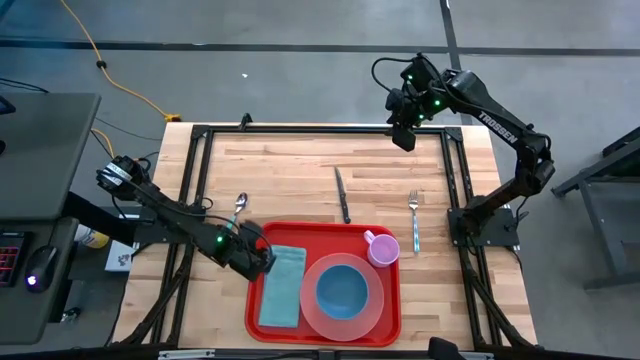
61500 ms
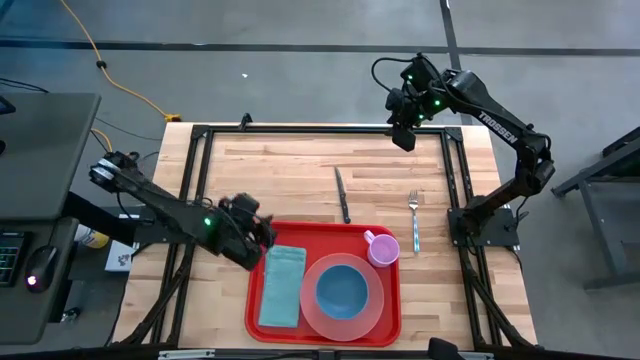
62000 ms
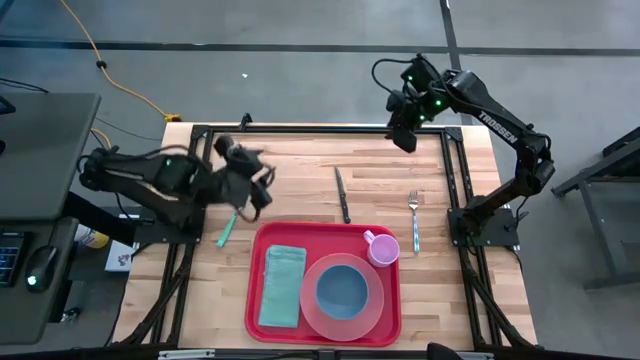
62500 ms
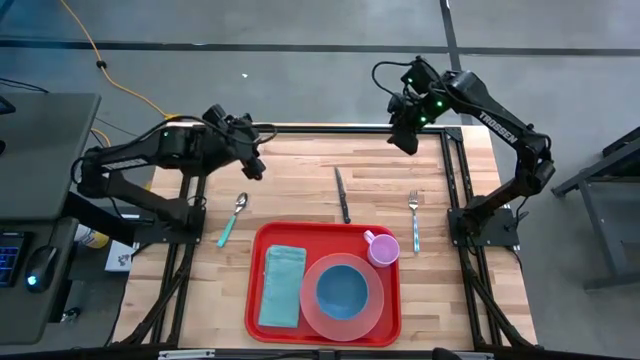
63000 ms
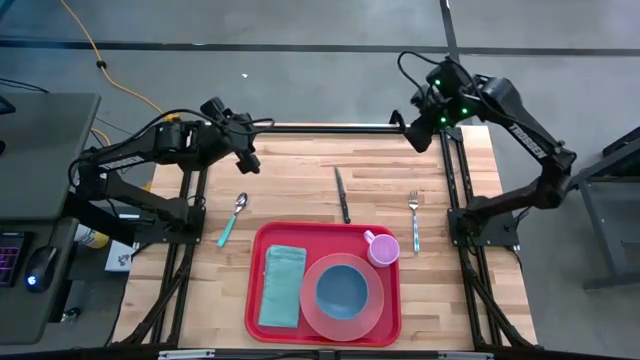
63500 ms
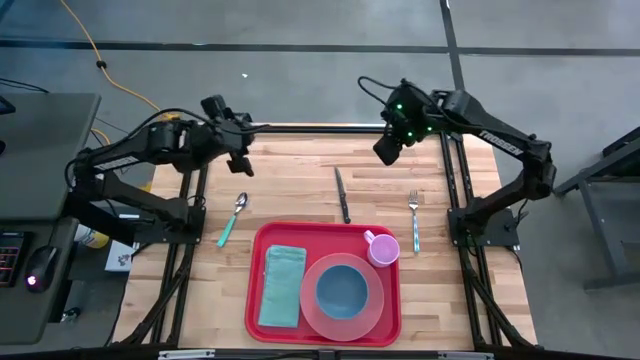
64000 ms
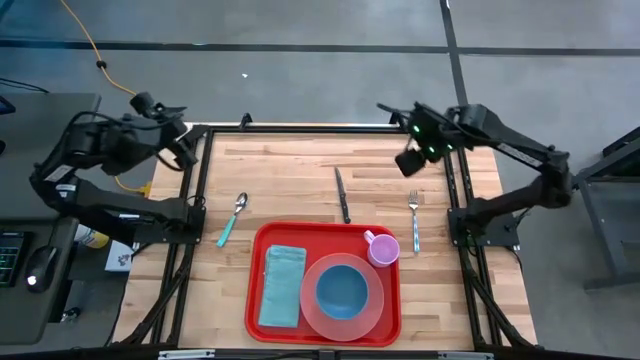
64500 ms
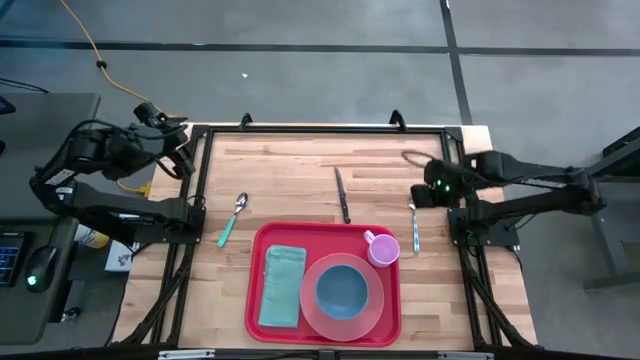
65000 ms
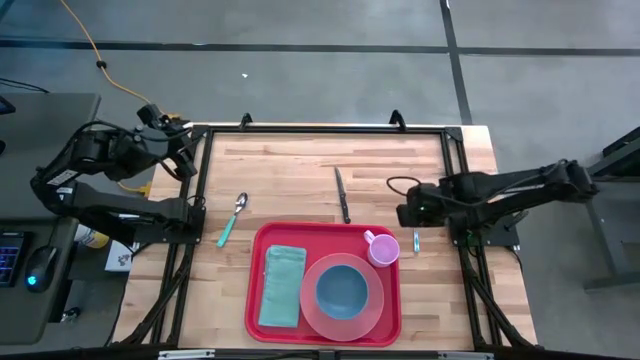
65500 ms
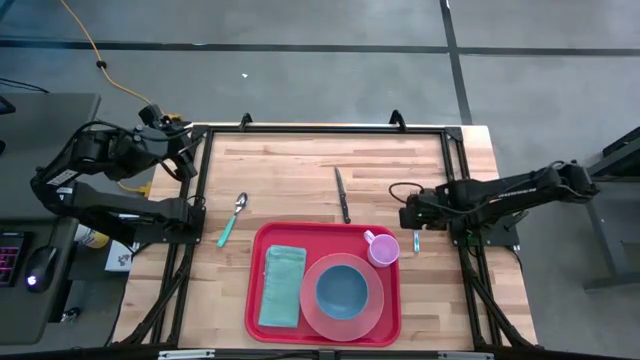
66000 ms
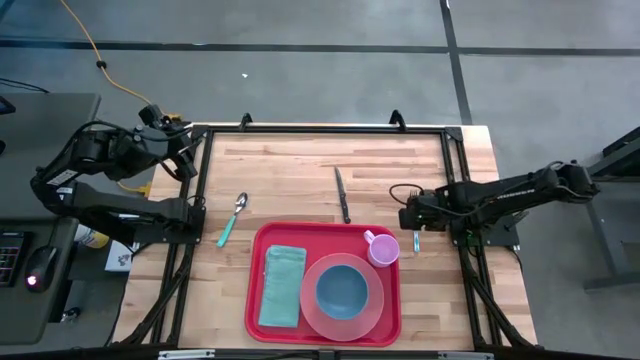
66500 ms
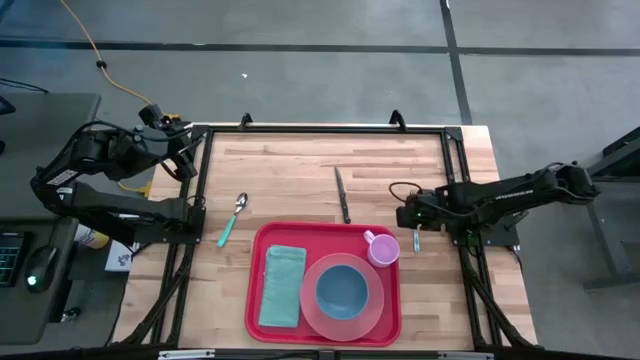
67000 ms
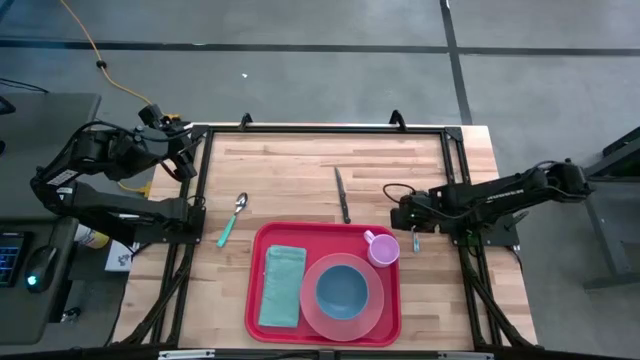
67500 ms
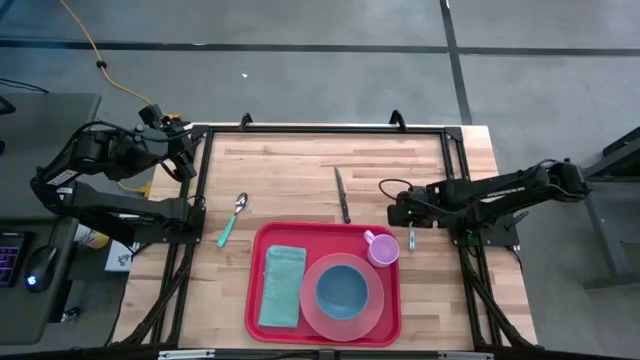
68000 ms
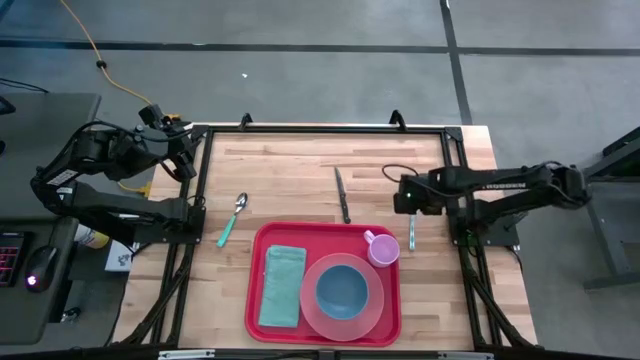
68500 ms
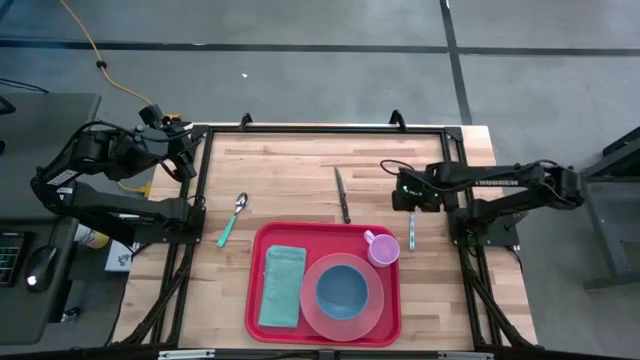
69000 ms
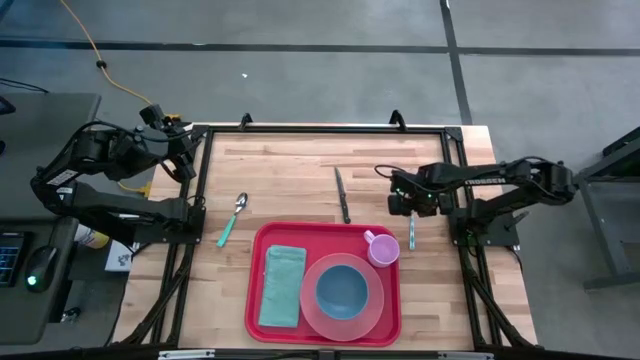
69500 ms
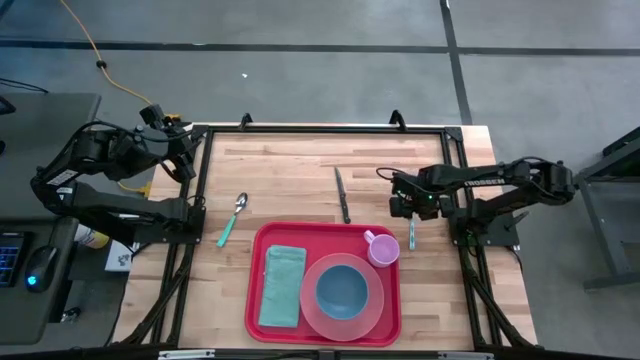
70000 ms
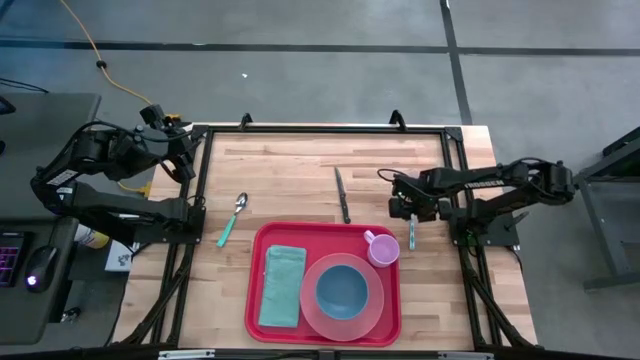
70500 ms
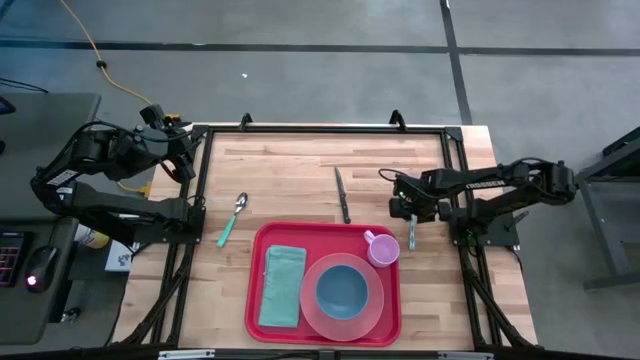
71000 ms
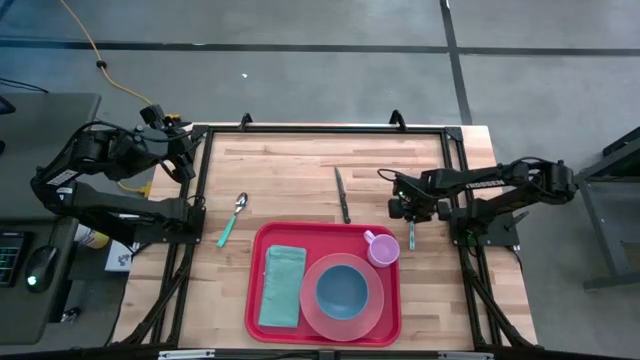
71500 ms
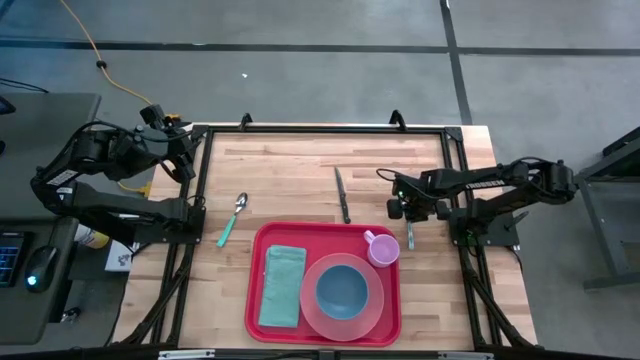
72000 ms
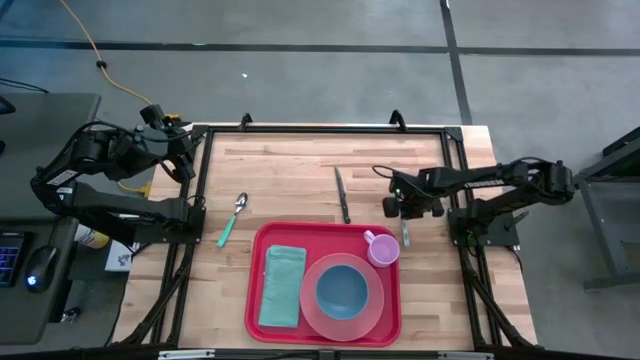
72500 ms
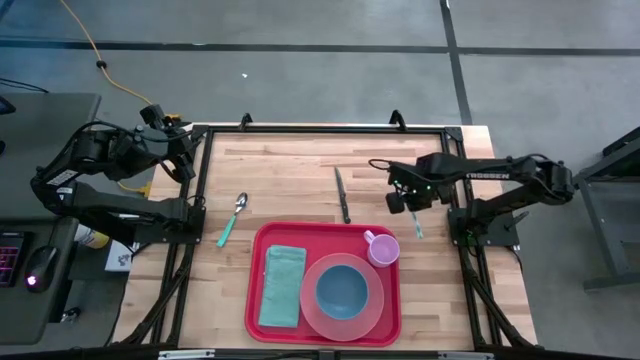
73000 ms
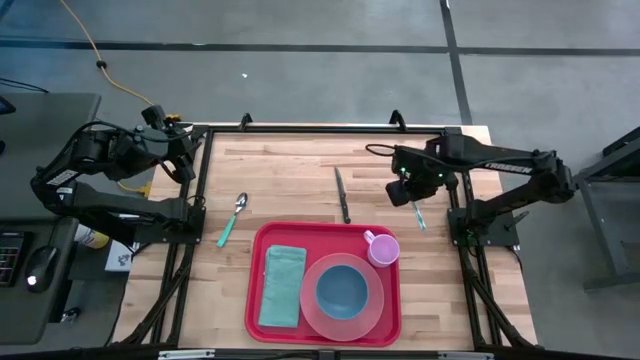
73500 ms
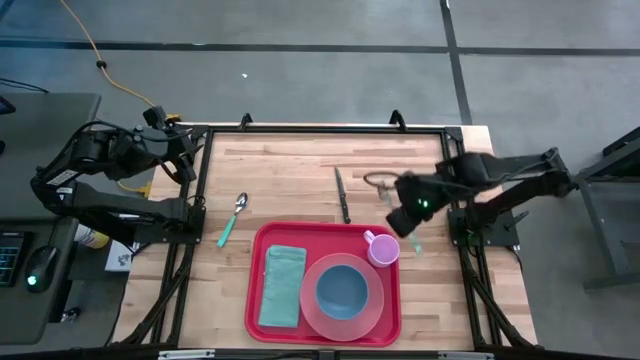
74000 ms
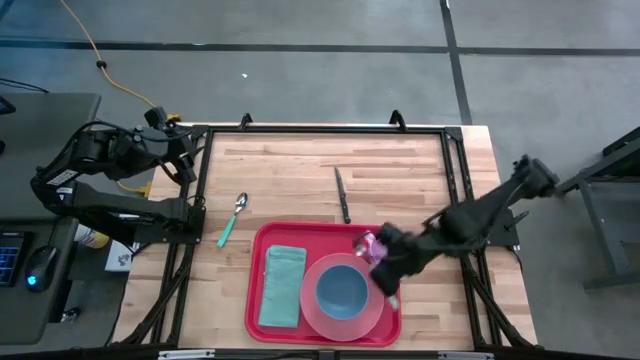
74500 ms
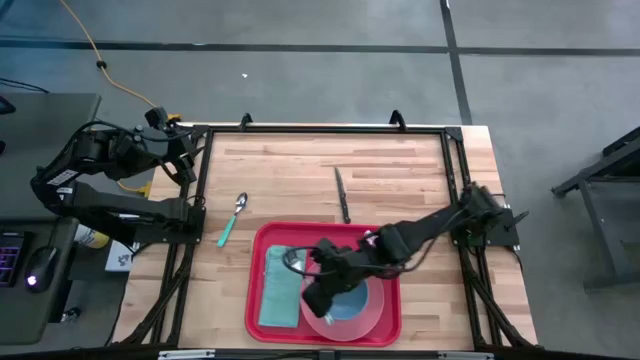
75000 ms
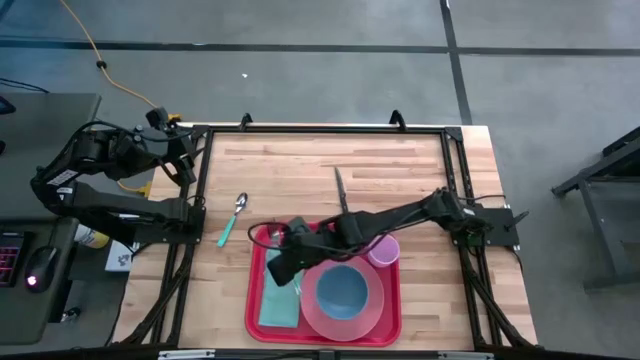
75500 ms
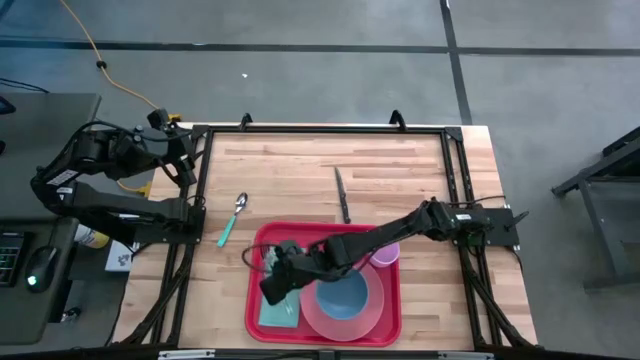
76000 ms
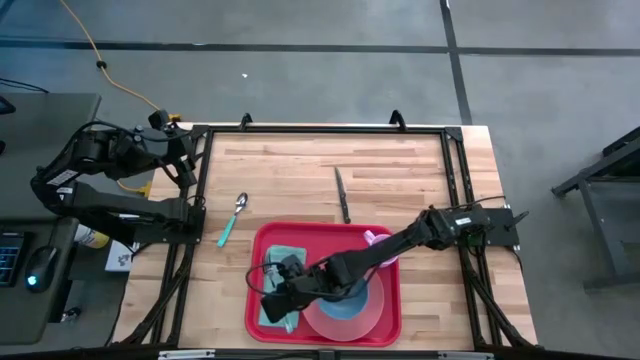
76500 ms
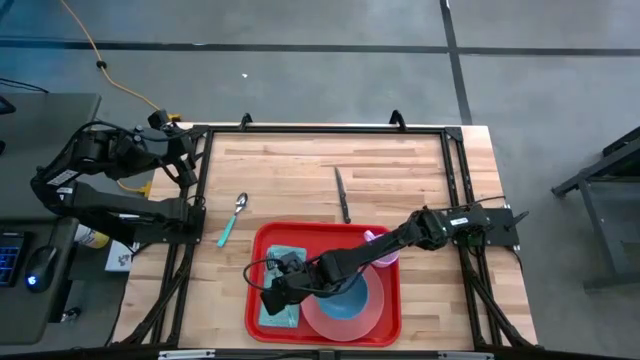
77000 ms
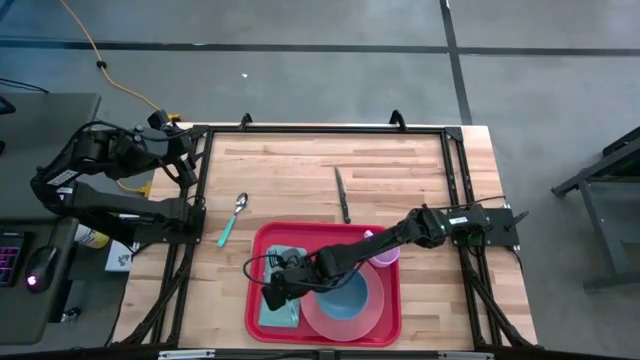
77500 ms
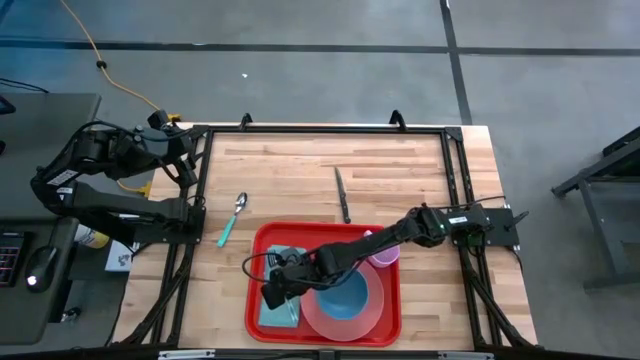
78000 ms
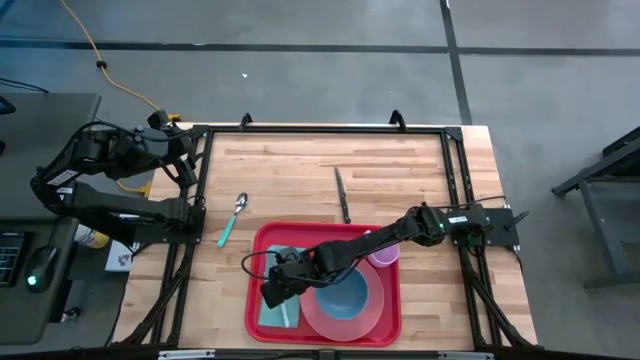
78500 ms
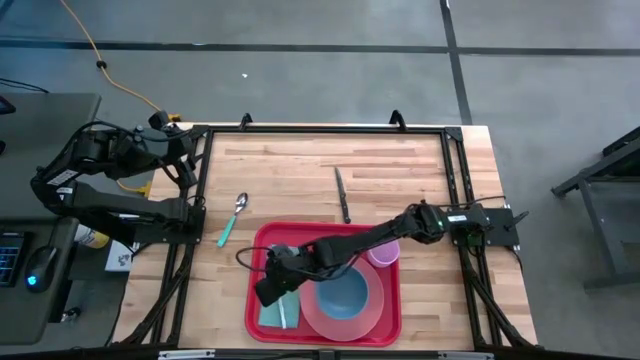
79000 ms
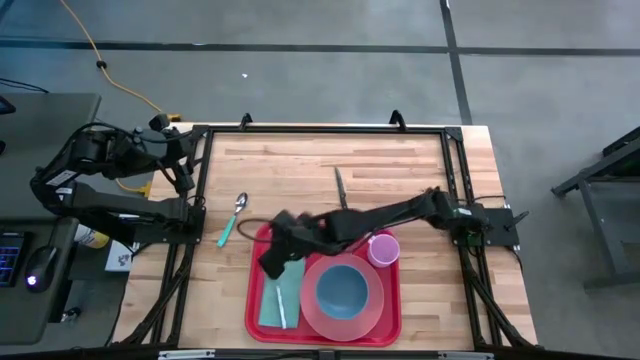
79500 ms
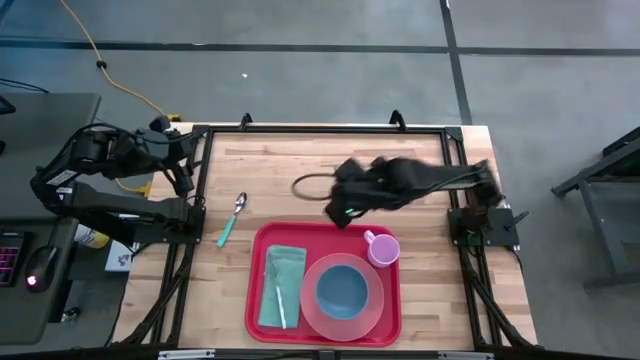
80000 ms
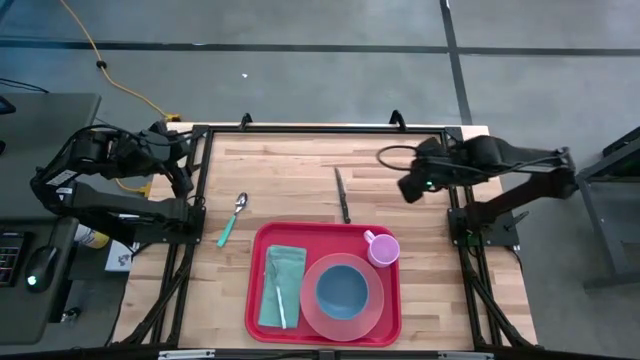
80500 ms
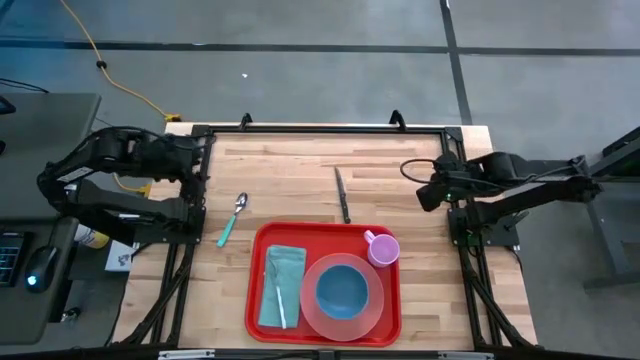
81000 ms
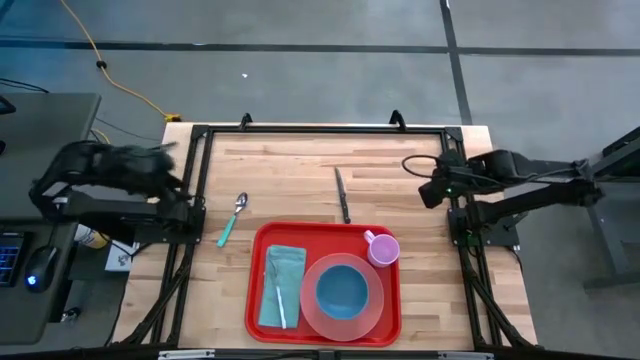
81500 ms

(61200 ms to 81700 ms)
Task: Set up tray
Put the blue patterned fork on the blue napkin

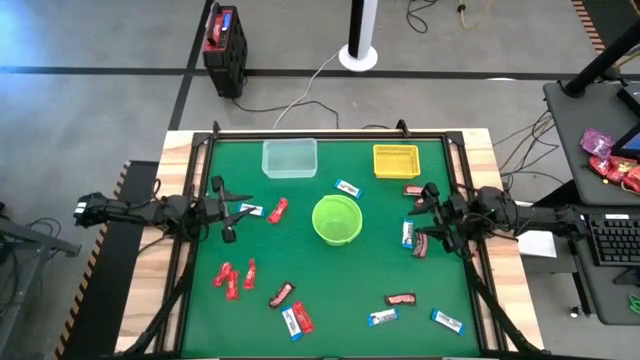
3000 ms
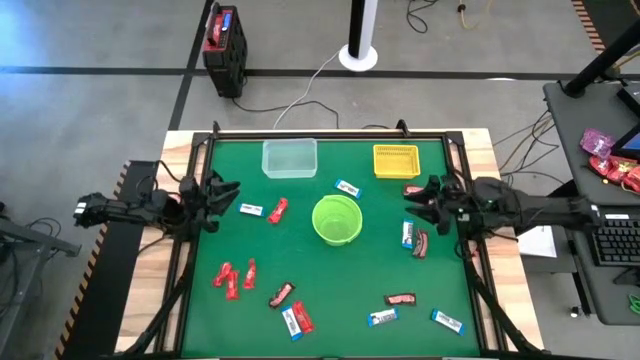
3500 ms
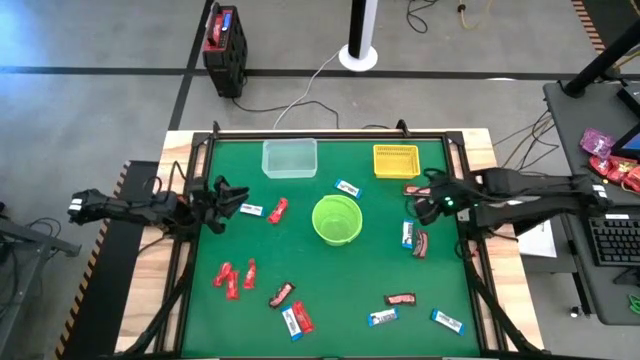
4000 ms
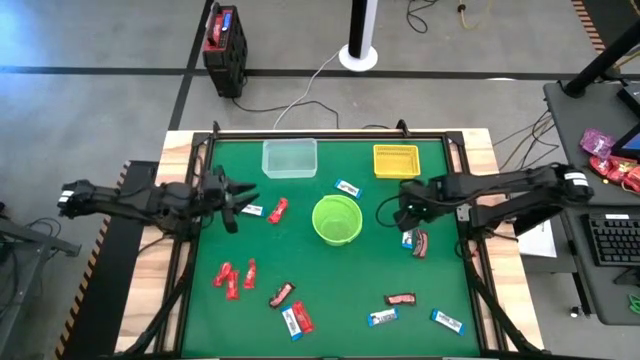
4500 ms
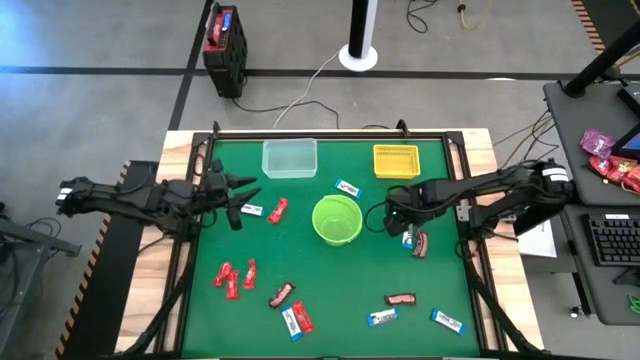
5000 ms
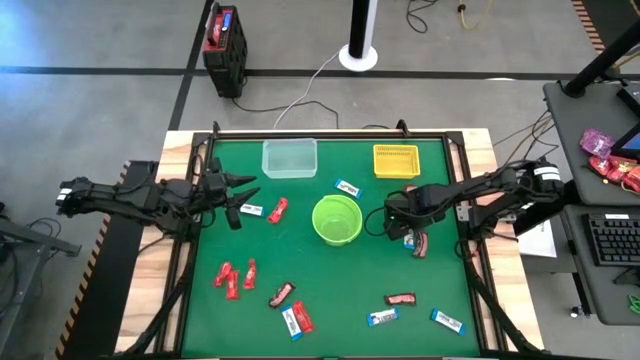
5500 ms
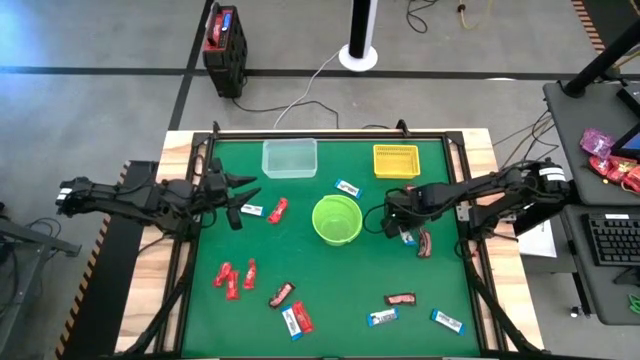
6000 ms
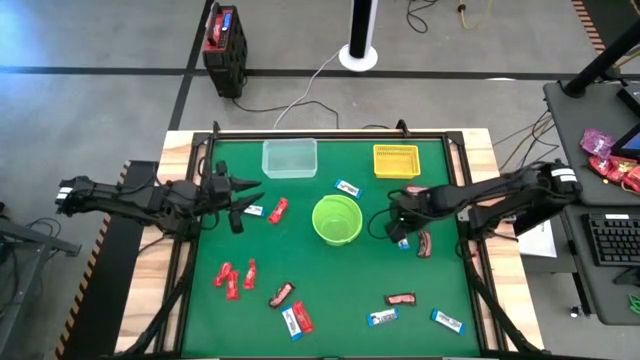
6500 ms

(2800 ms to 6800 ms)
Task: Sort candy by brand, put in halloween buckets
Put the white chocolate into the green bucket
